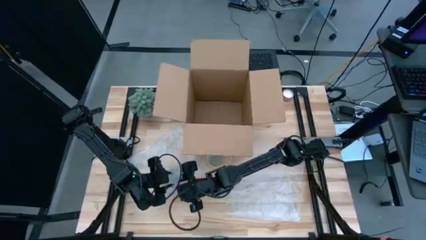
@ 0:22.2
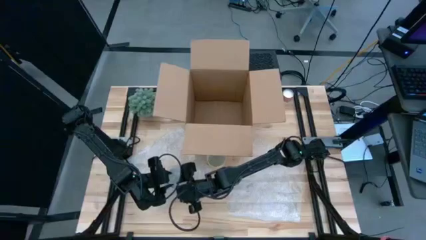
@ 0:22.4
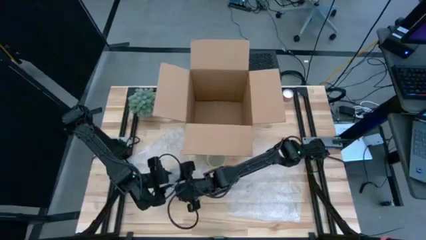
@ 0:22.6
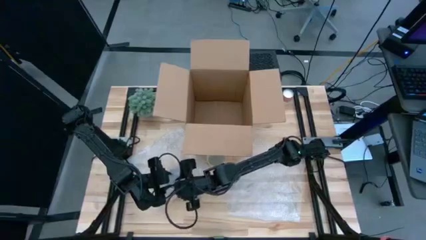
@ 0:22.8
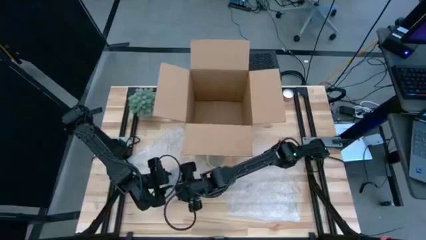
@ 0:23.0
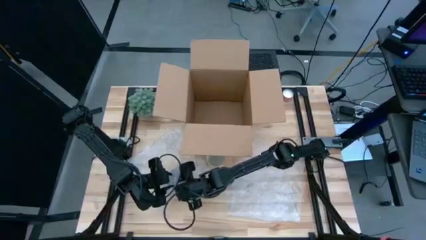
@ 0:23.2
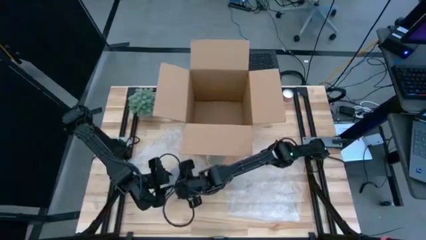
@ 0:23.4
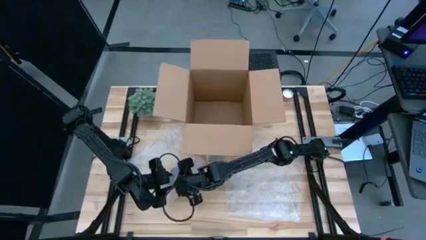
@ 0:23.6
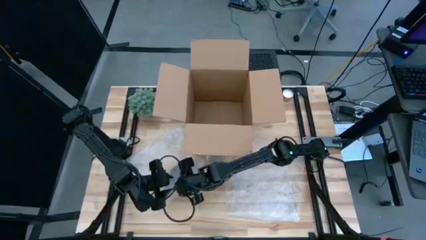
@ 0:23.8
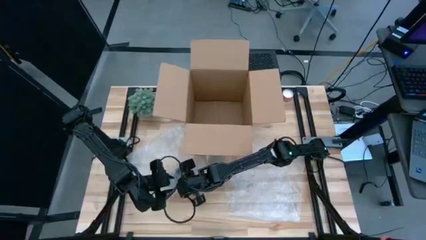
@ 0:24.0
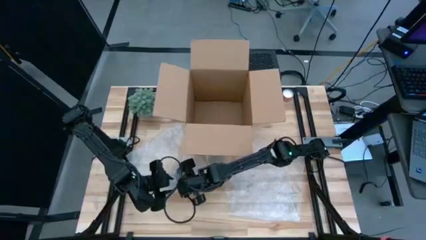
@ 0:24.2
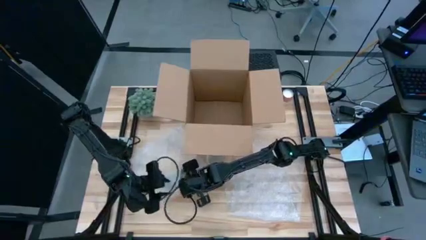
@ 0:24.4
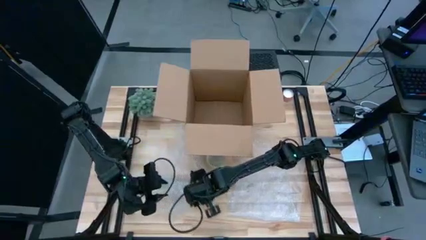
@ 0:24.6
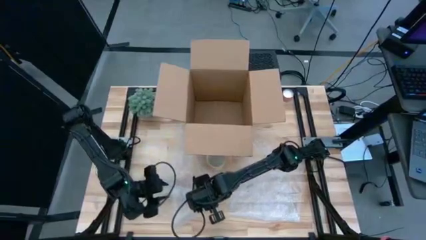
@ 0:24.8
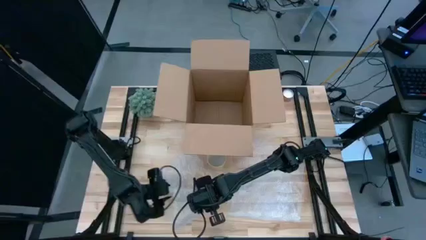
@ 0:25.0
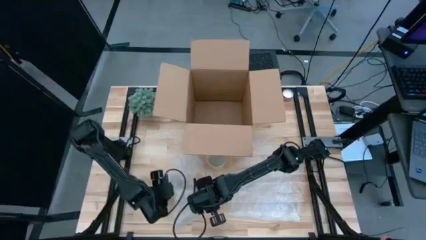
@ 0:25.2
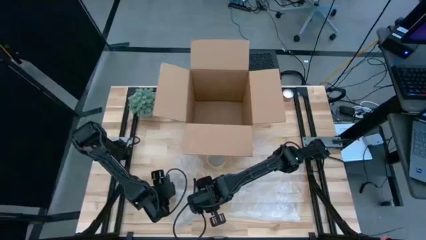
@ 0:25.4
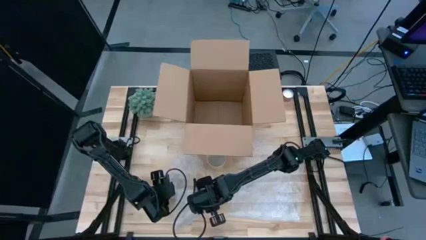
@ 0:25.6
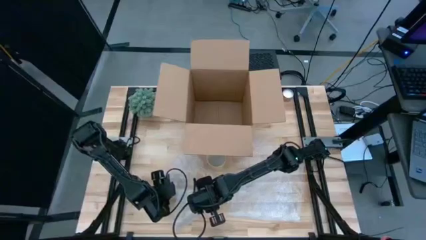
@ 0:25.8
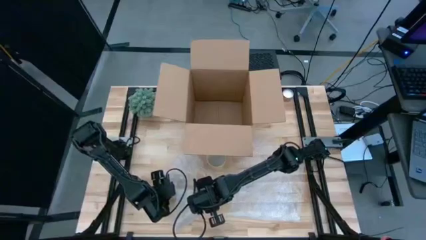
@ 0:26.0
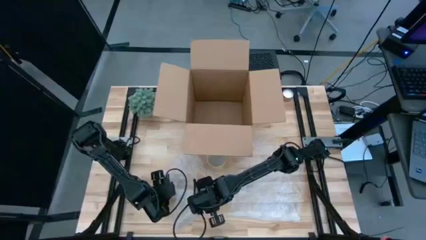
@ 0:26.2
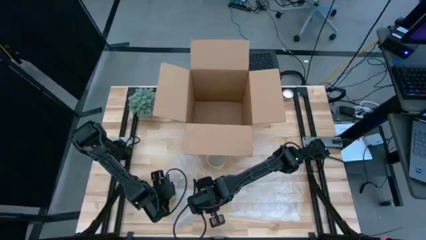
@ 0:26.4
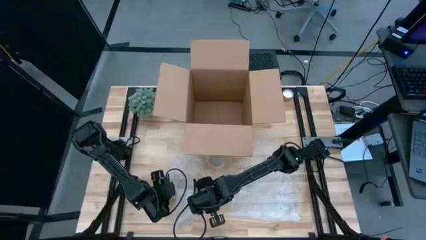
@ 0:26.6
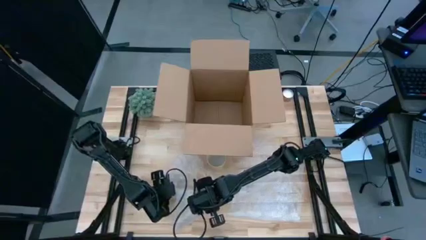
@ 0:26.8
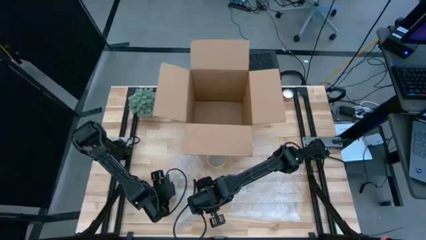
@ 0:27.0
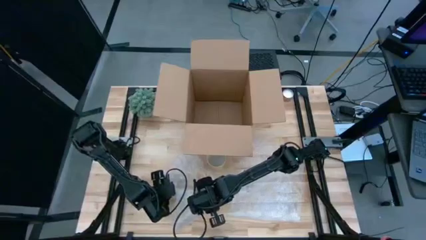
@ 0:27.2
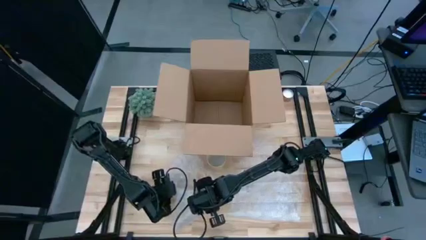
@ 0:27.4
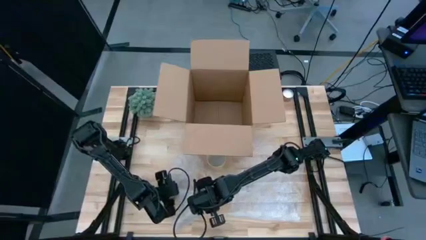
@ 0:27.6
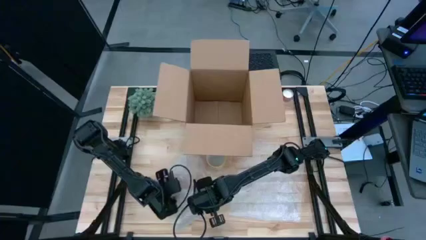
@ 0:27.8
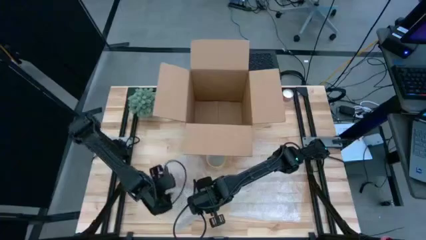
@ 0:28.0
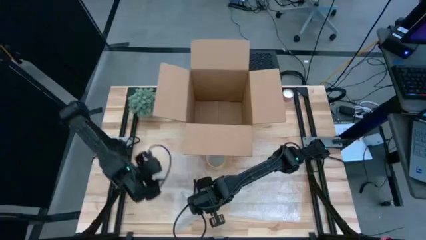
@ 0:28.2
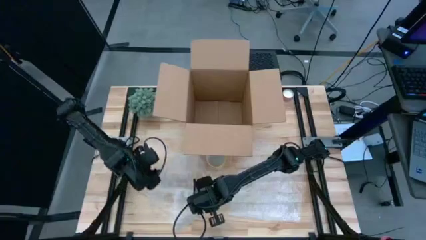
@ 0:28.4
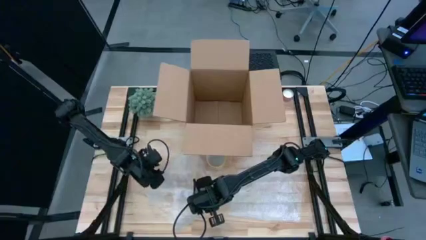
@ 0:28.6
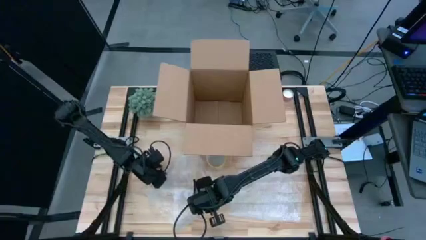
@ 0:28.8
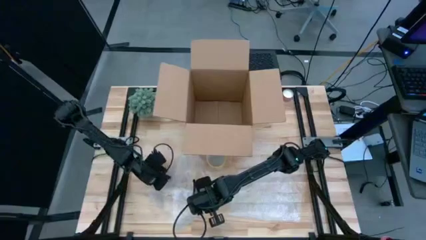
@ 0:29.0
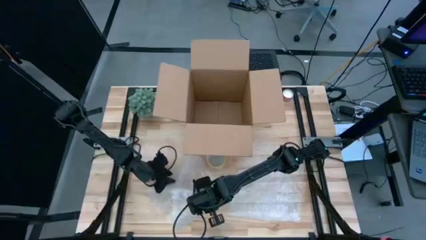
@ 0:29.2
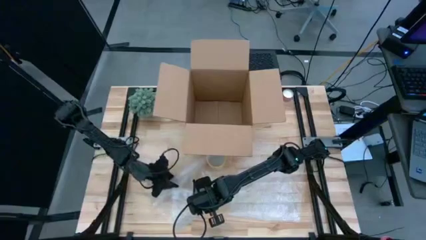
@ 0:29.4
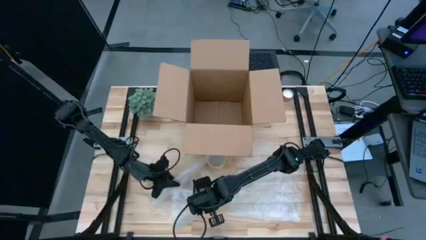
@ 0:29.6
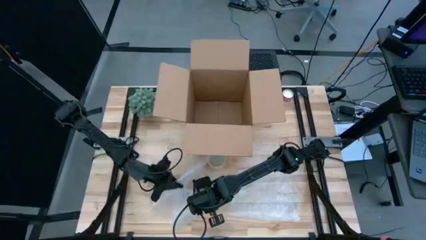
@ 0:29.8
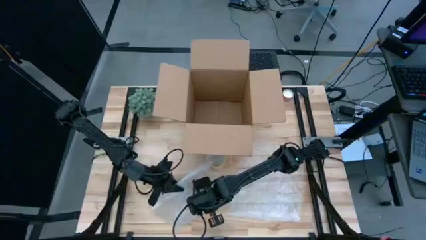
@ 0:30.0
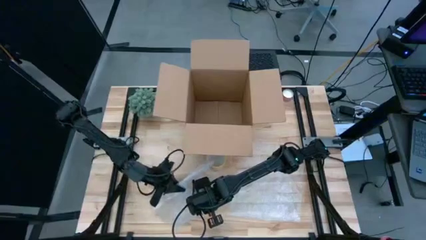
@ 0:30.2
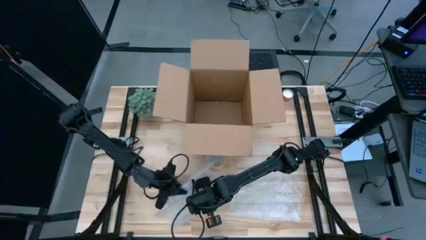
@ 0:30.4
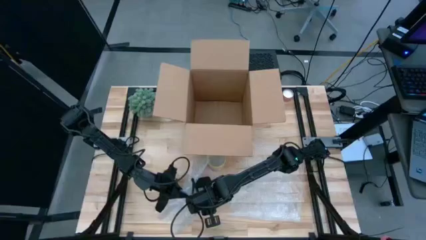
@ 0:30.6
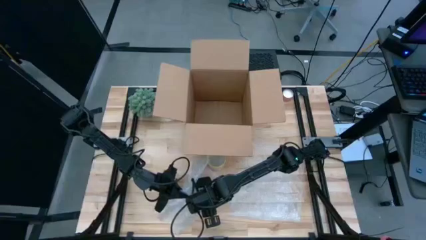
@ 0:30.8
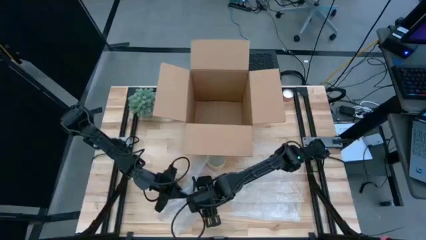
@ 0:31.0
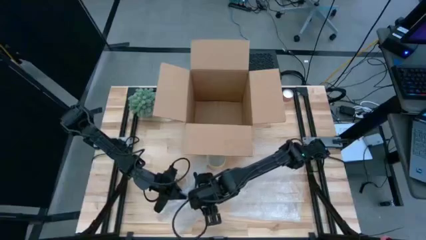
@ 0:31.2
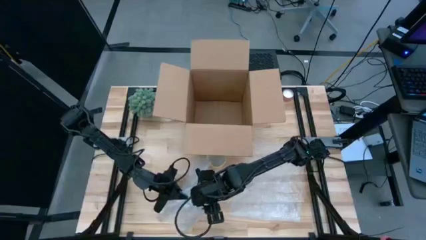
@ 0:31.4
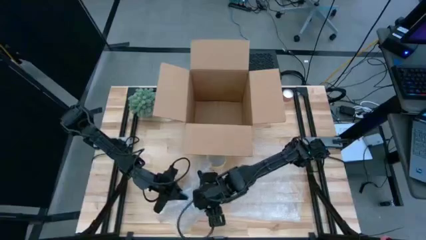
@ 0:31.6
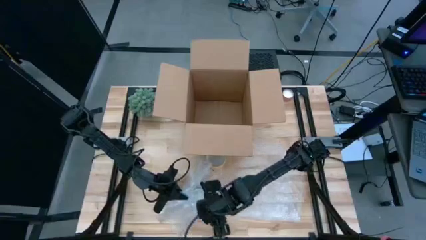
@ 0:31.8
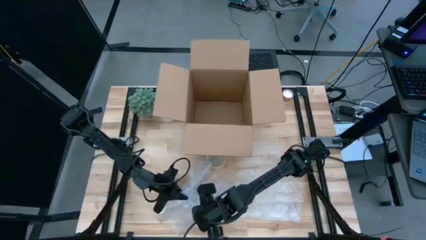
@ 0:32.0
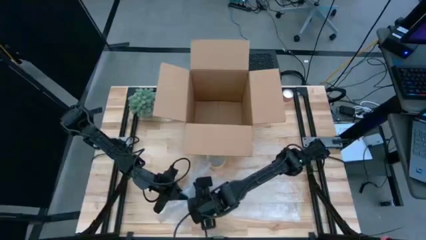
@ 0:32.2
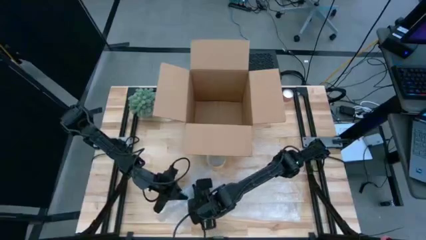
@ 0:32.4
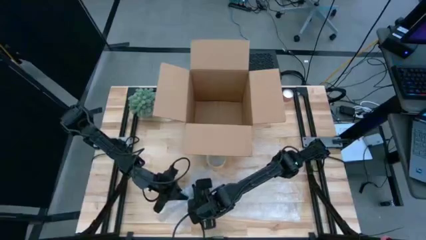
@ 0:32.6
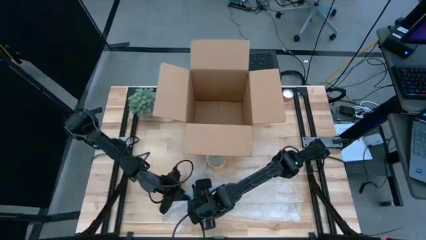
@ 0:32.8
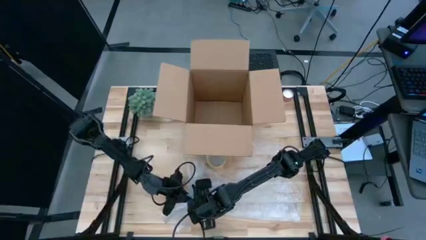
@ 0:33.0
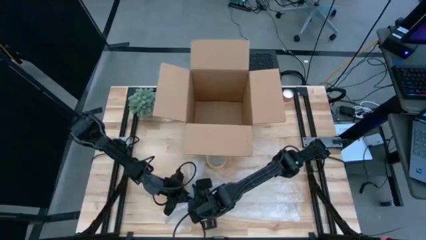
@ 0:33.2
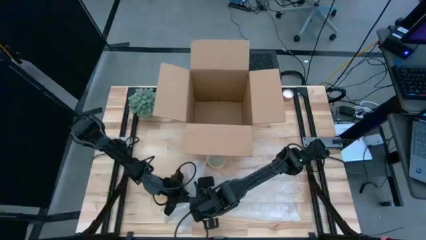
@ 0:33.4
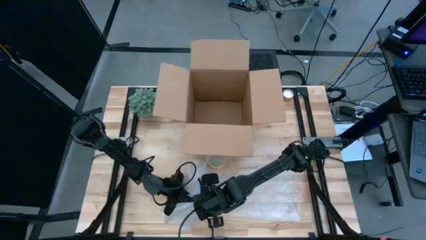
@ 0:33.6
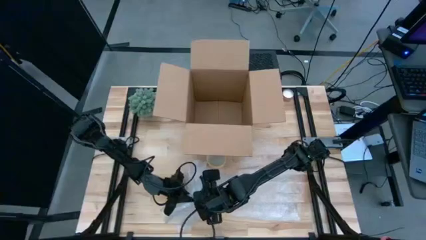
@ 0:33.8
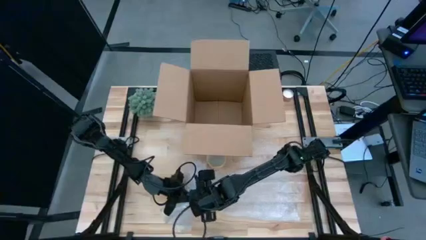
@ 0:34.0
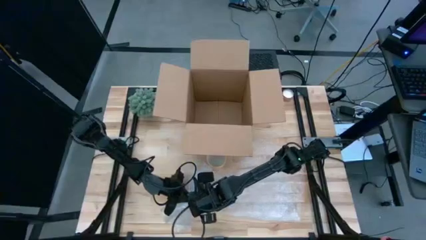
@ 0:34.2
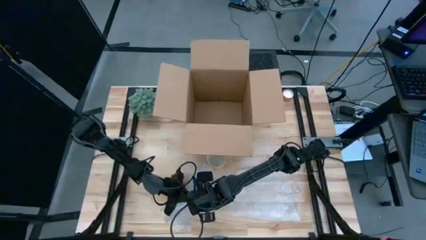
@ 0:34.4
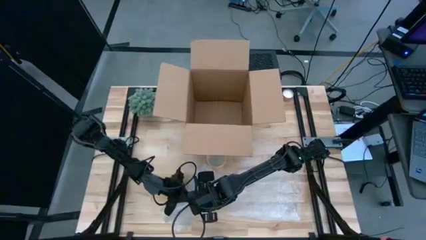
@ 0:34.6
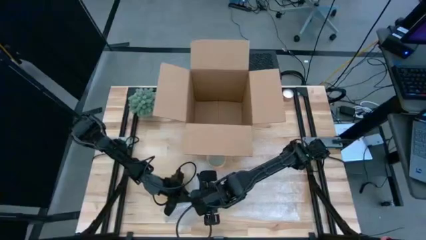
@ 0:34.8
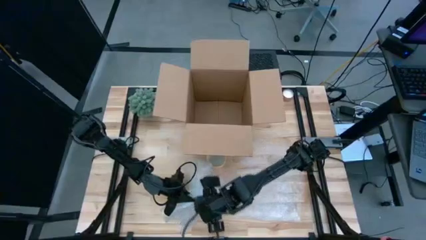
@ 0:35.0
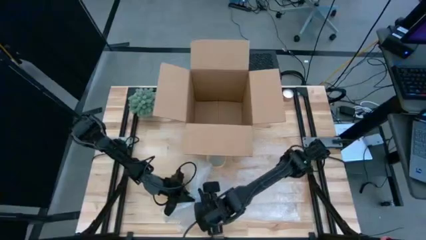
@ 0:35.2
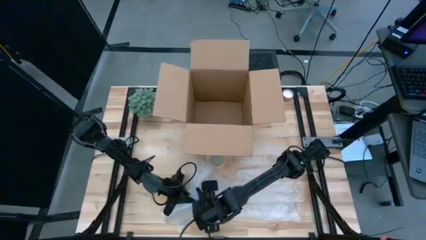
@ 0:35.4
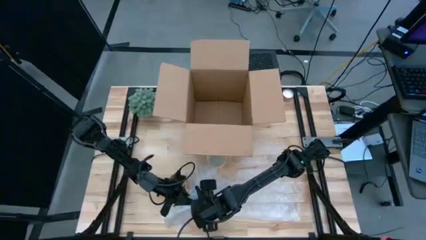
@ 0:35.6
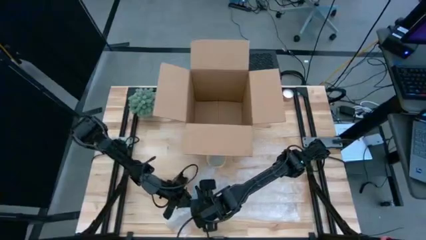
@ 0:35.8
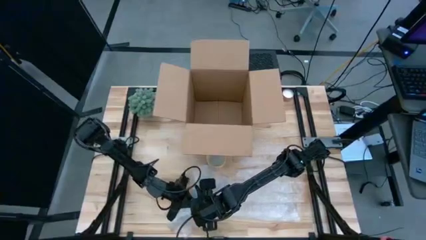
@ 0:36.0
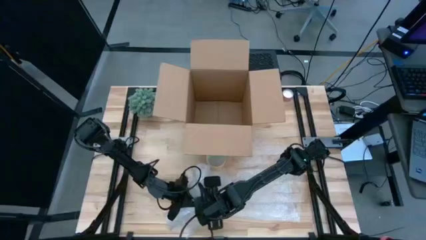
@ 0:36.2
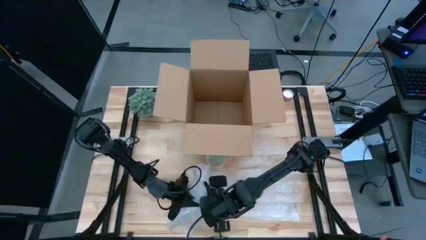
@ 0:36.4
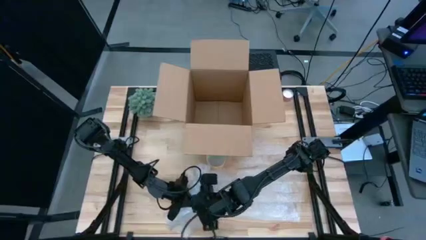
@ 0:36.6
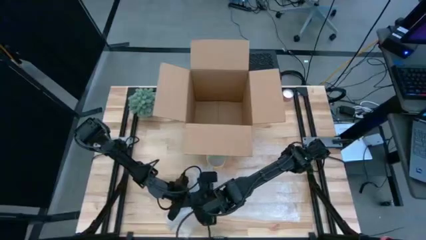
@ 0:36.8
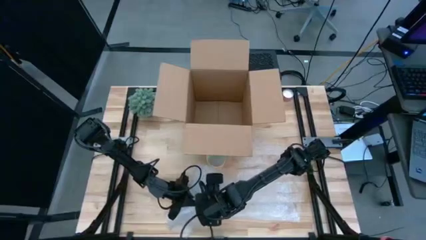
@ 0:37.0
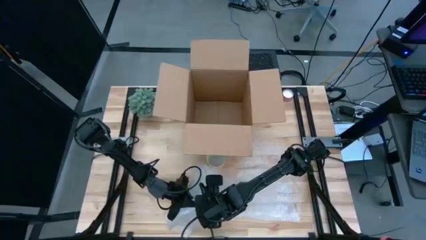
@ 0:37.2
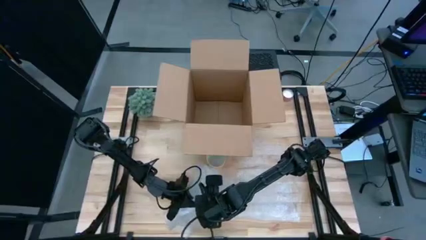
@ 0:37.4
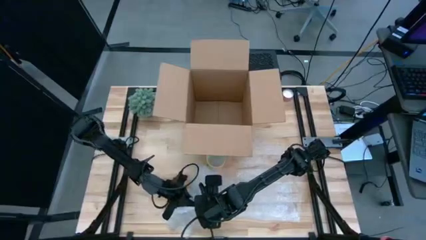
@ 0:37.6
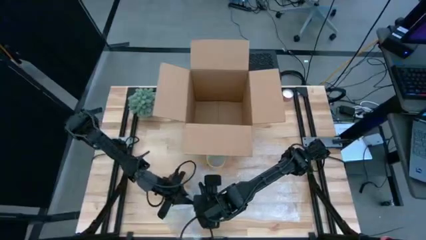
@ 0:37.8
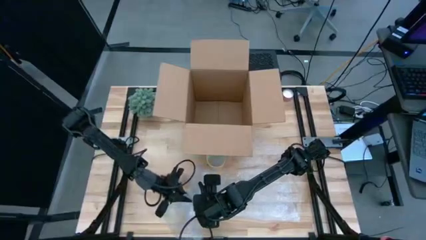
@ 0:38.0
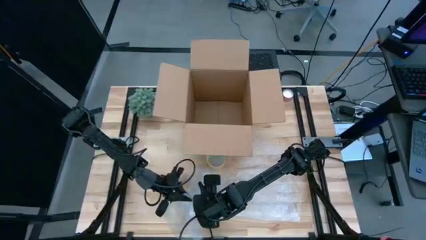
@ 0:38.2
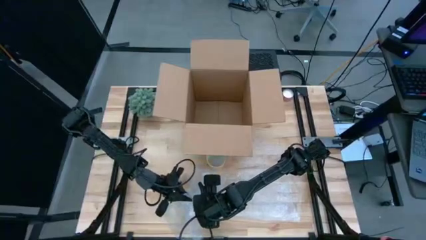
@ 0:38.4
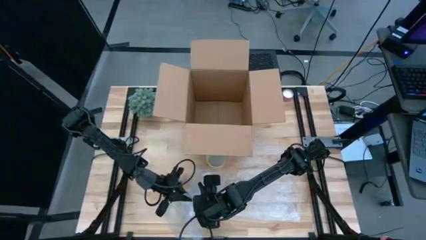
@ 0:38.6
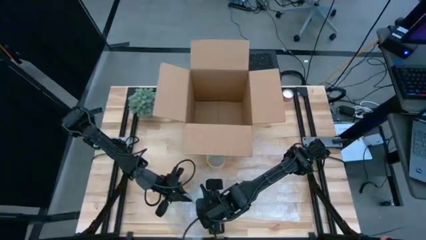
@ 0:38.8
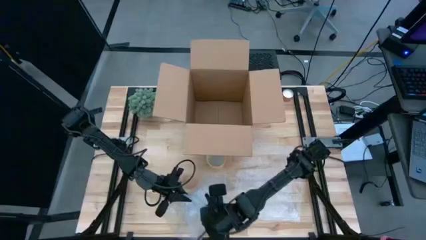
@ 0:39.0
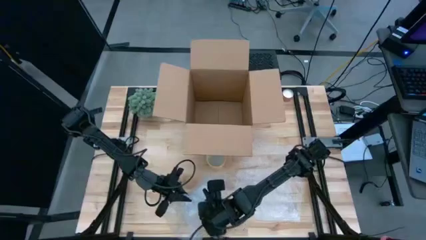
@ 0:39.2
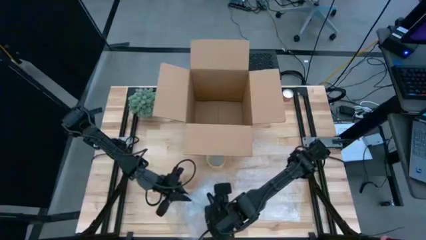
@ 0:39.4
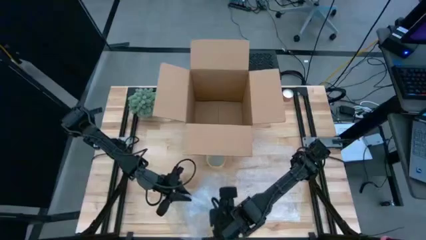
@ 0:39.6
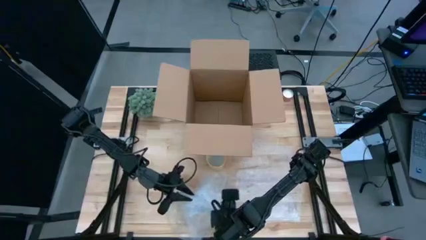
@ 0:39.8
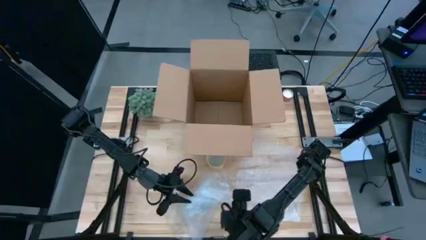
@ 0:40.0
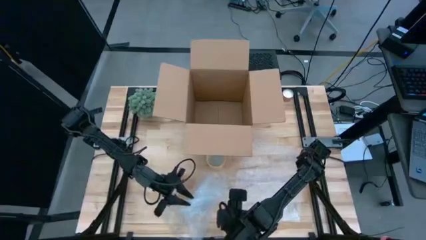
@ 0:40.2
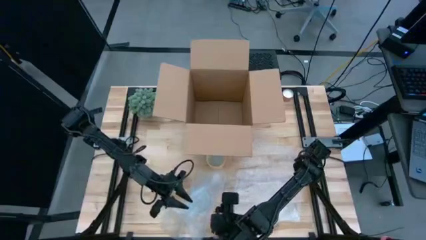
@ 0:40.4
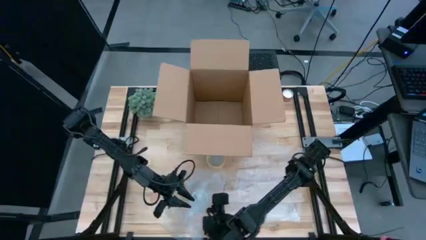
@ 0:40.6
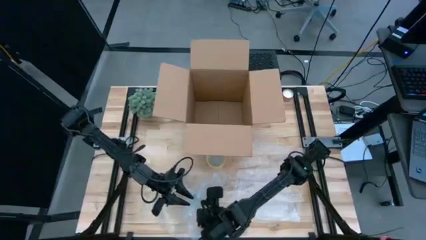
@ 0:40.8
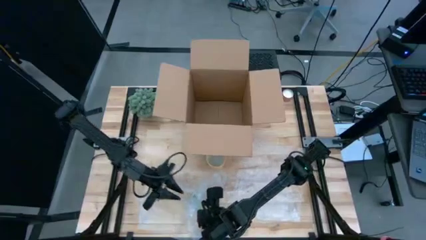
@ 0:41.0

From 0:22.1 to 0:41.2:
Task: wrap mug
Wrap the red patterned mug with bubble wrap
